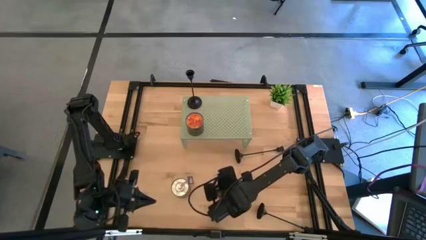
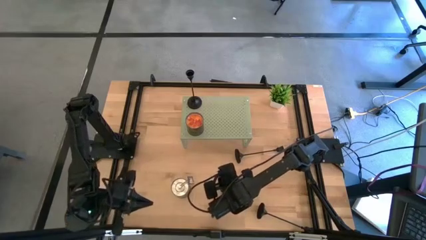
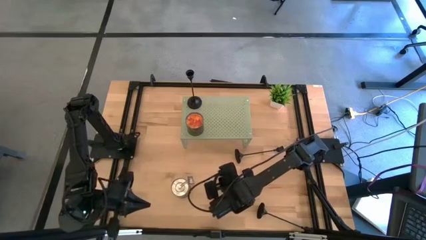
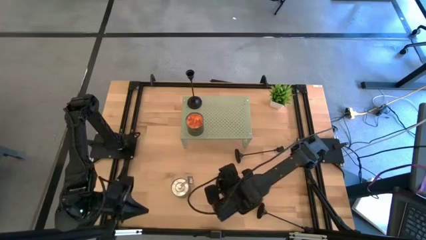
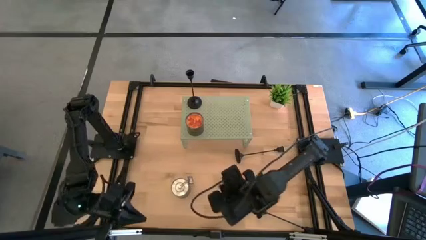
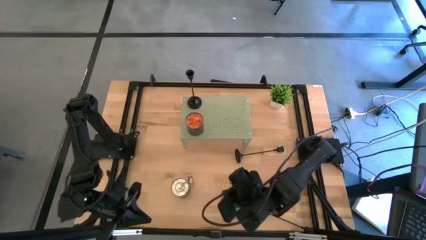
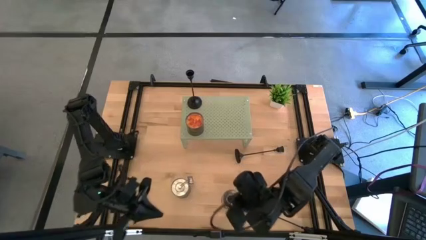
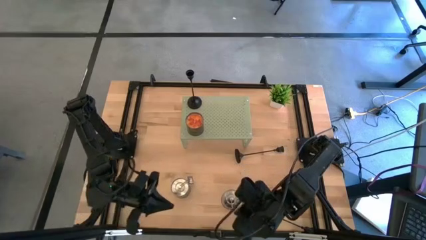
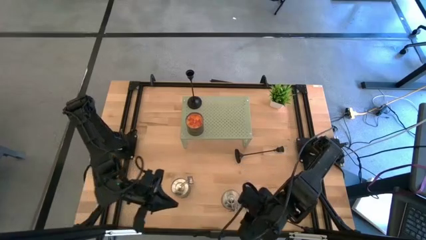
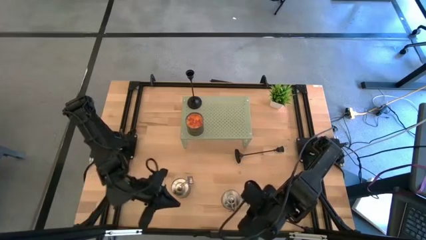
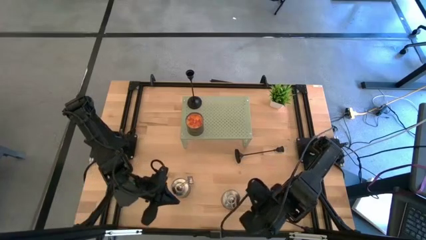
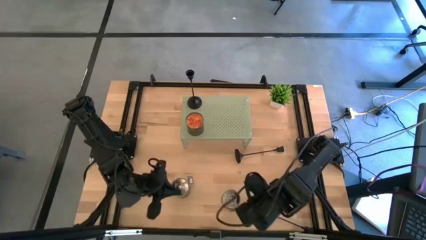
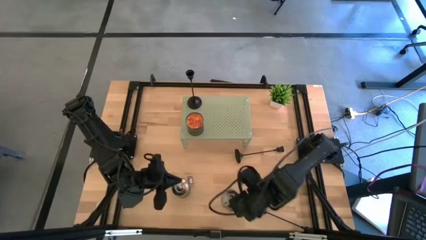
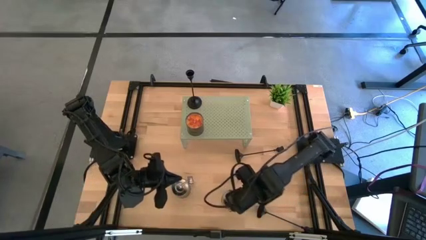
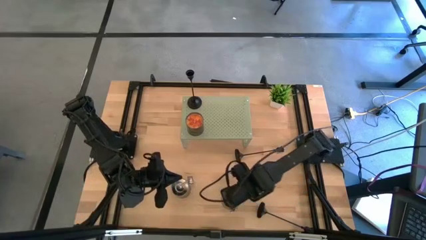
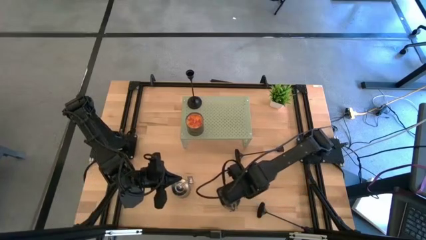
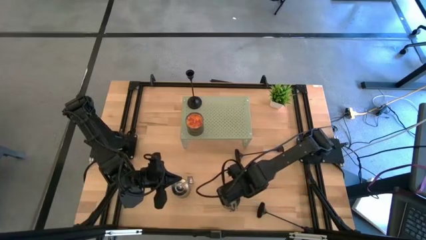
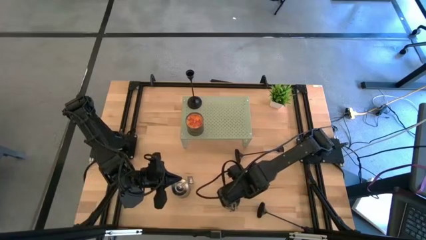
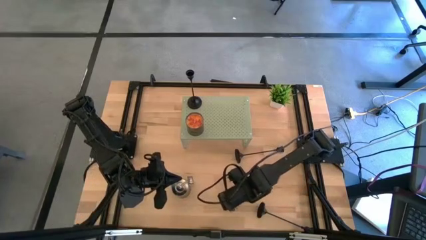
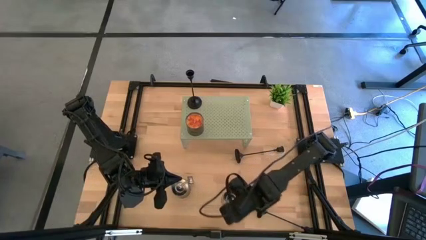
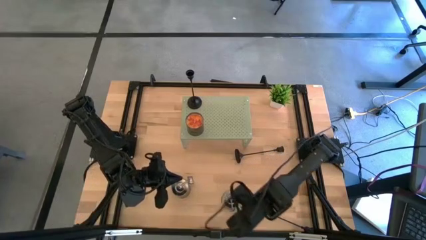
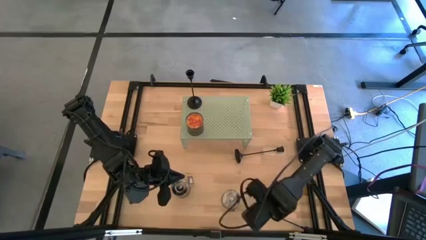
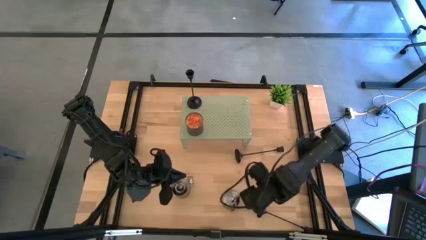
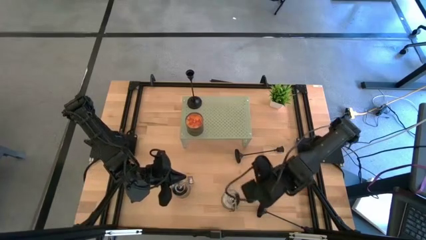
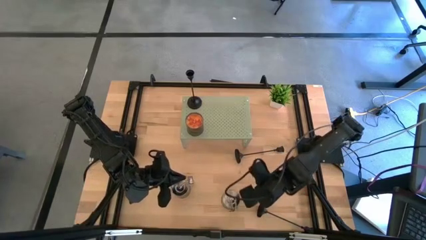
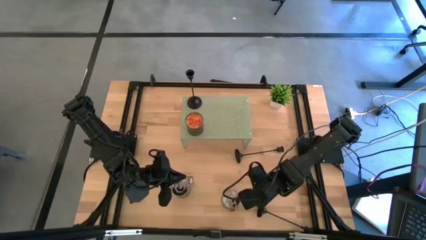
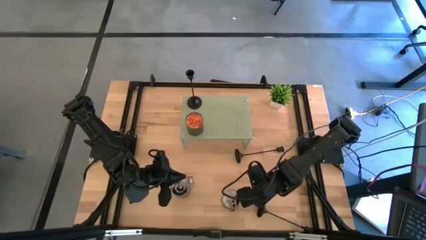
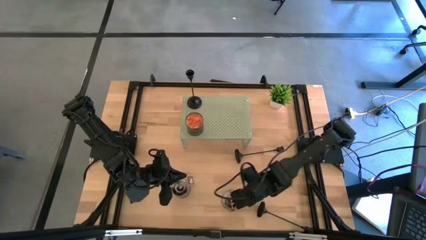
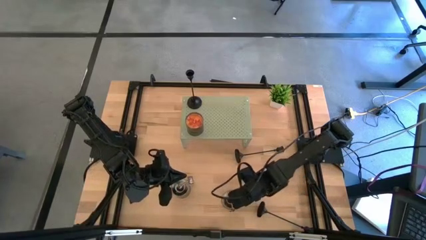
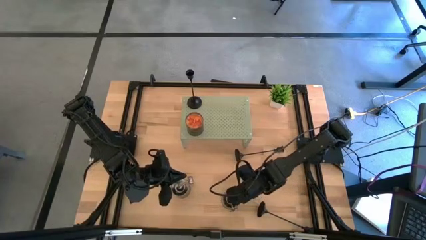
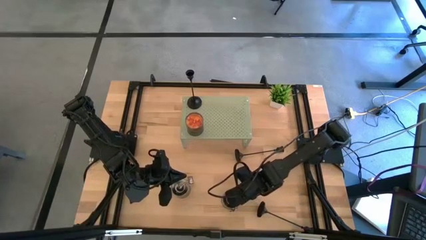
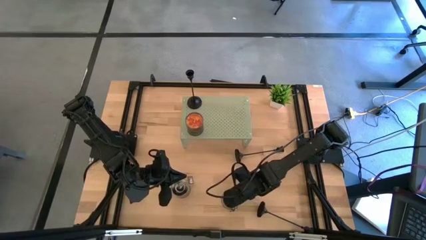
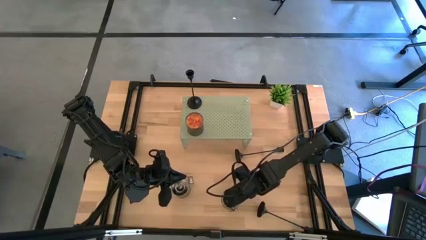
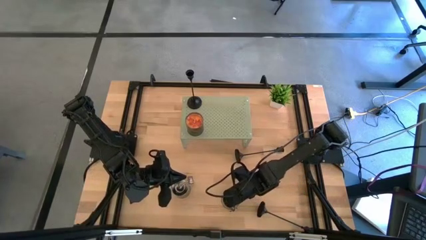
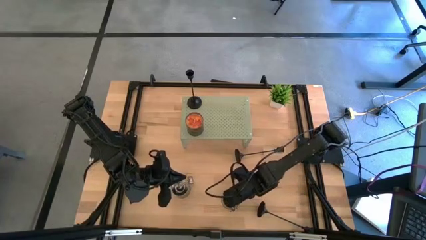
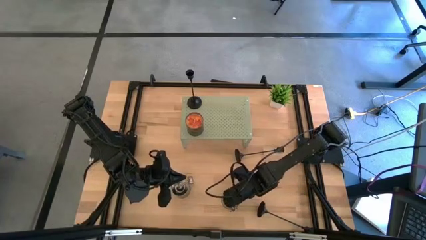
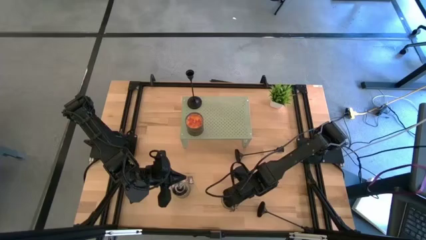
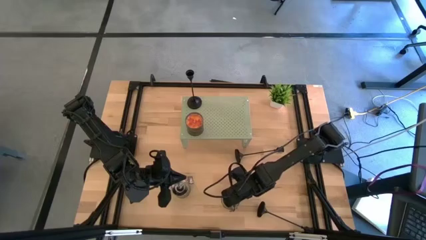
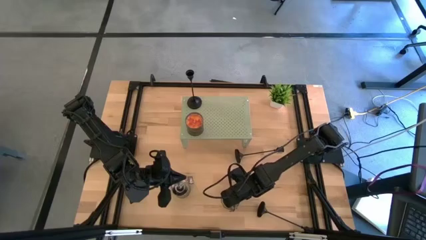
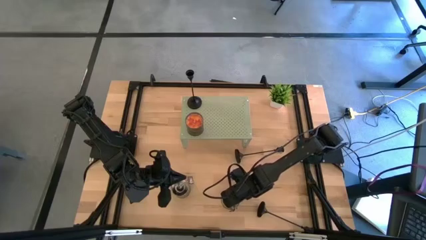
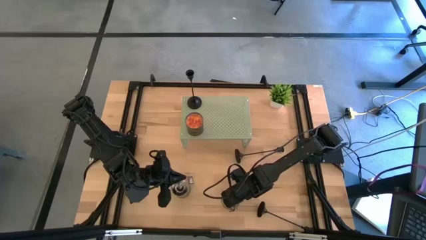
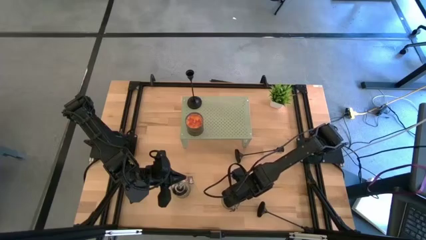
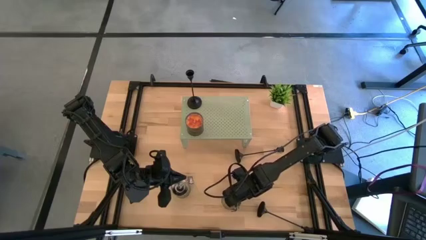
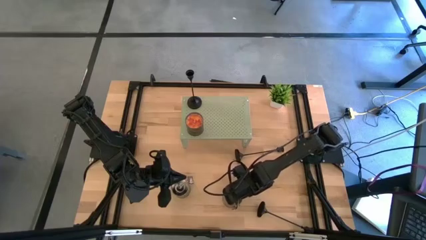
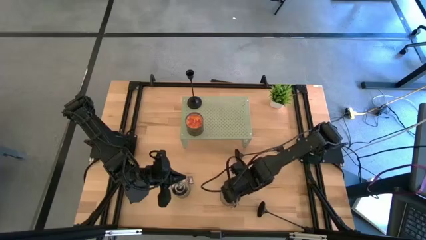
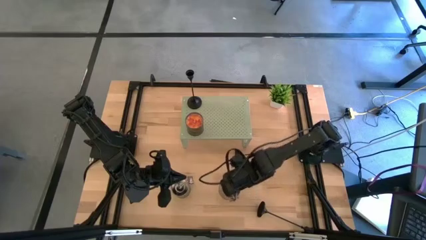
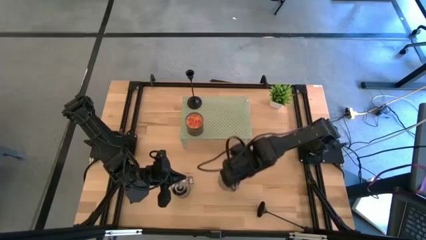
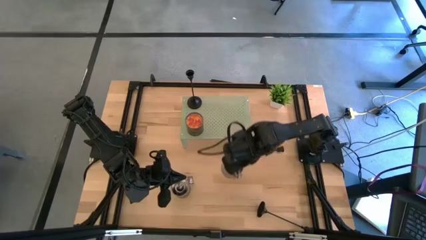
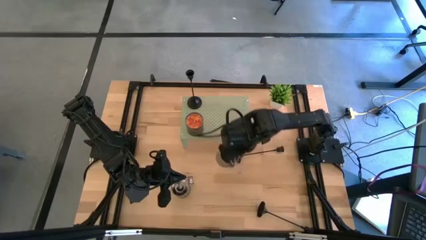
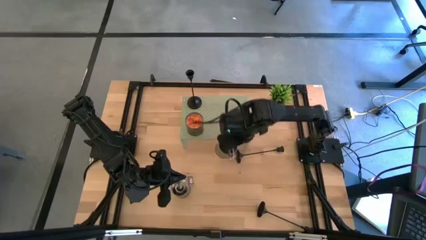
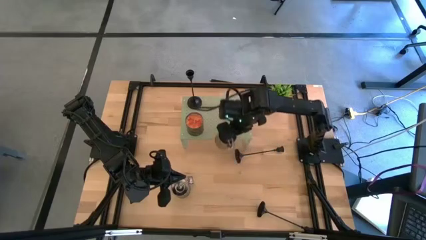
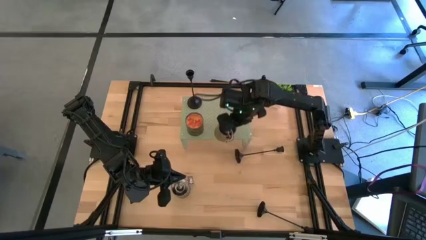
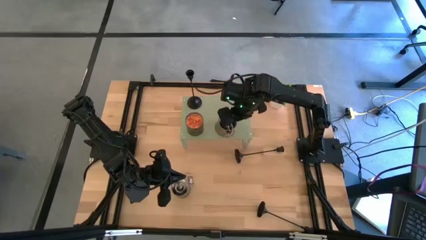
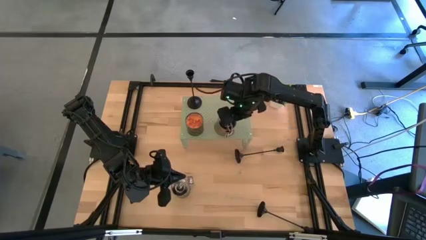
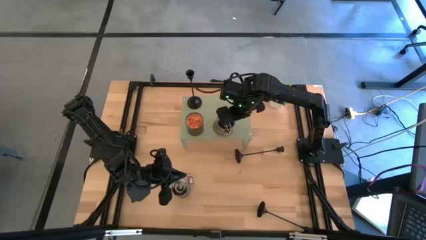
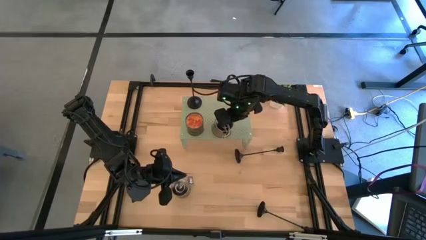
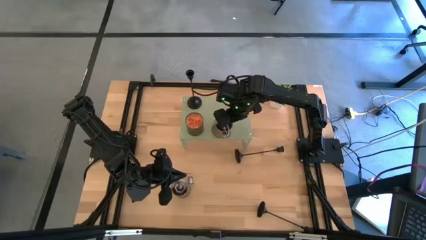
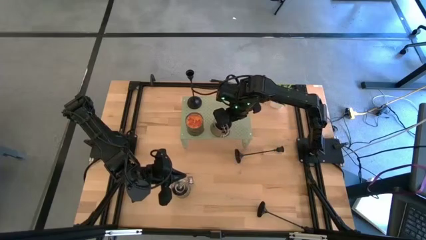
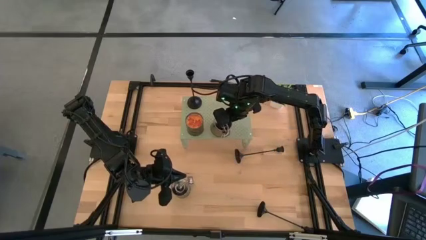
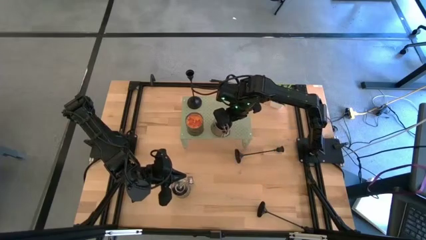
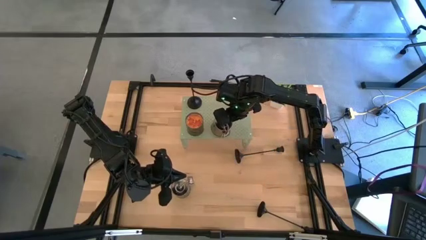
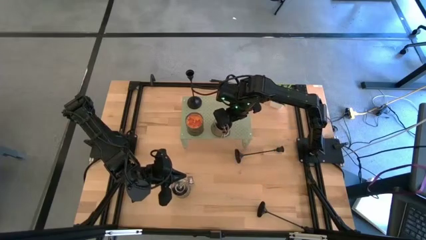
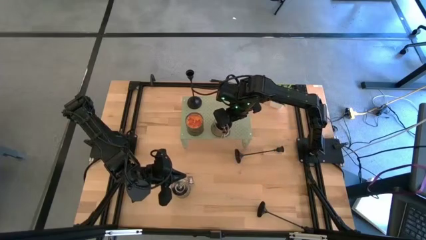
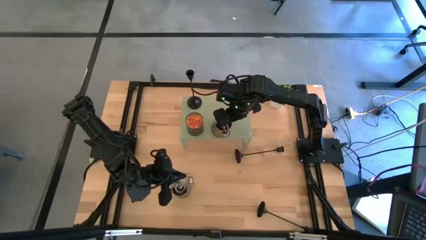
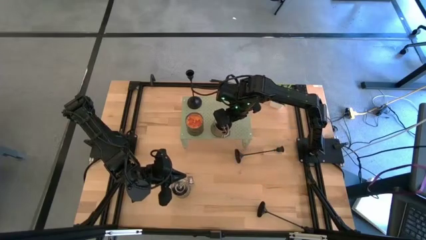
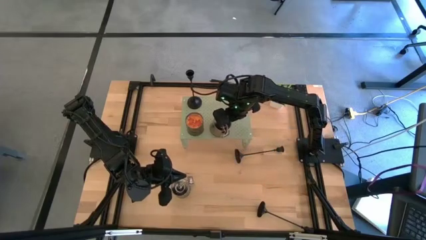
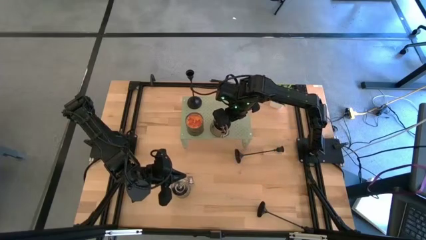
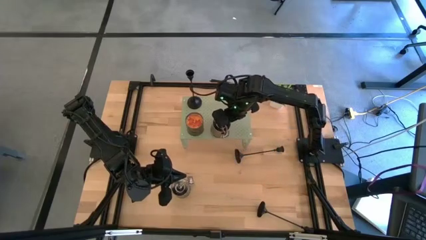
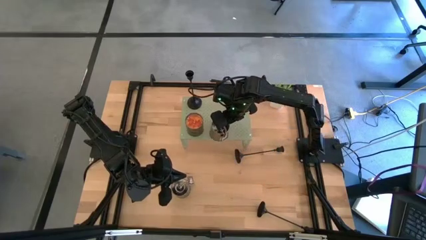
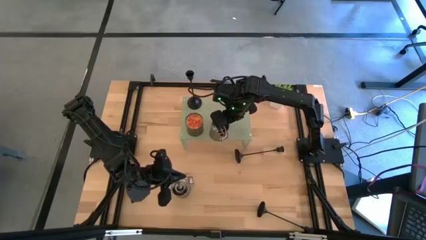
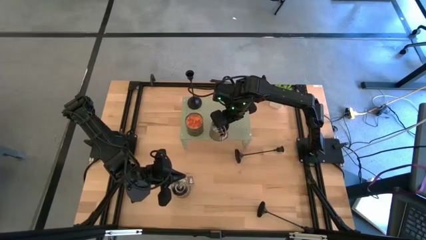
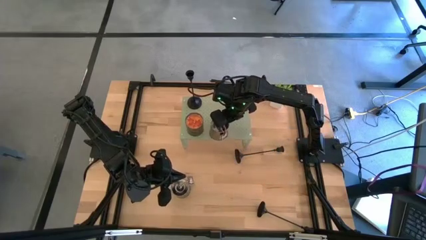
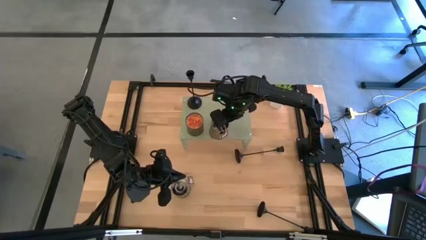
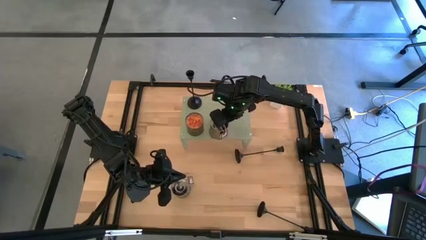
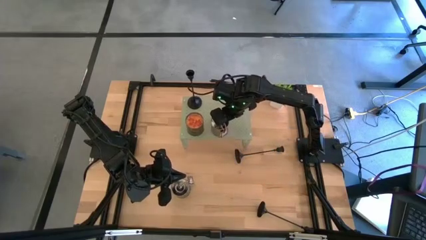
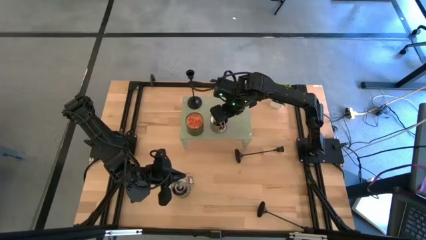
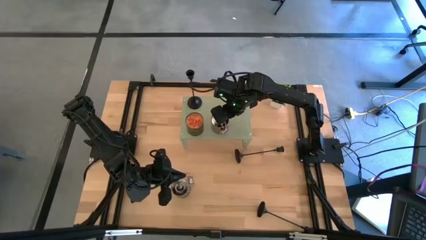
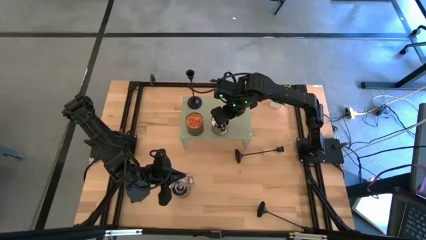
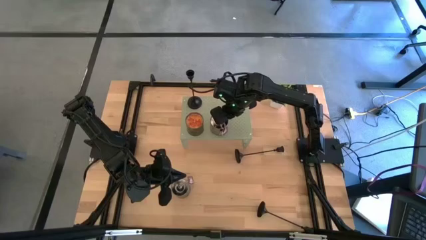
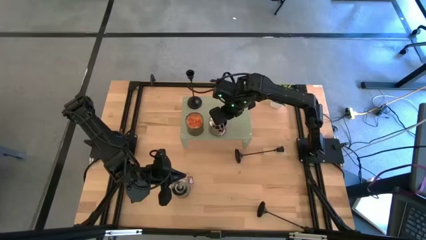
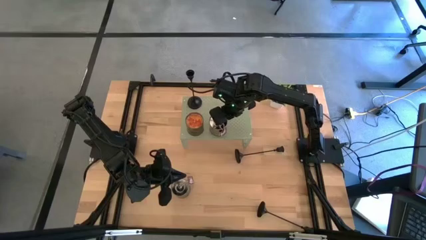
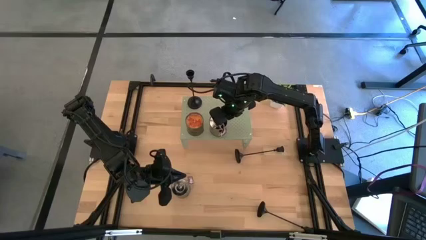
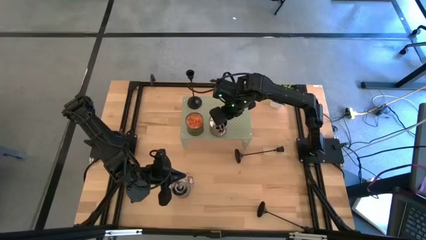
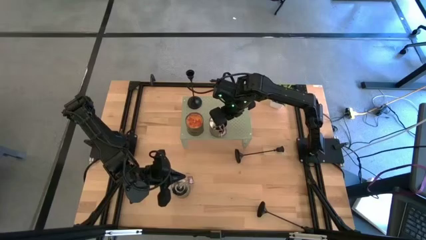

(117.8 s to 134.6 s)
Task: Pick & Place candle stick holders
Put the top brown scented candle on the shelf aligned with the other scented candle

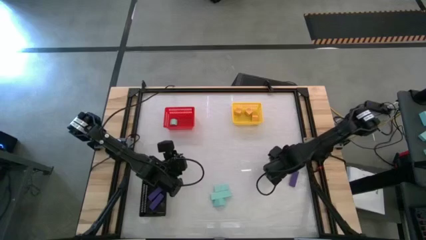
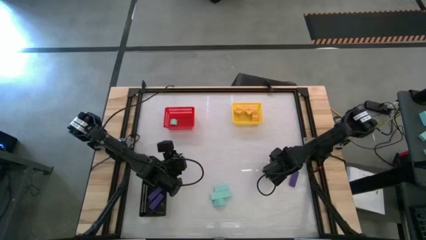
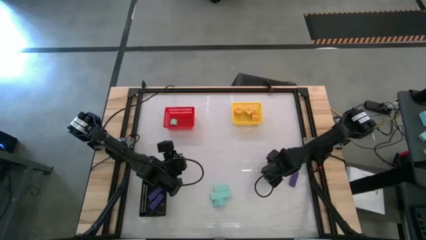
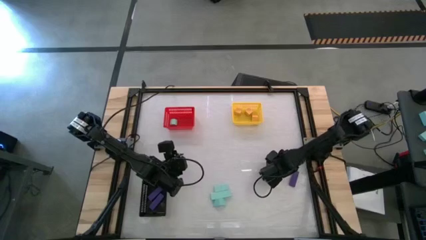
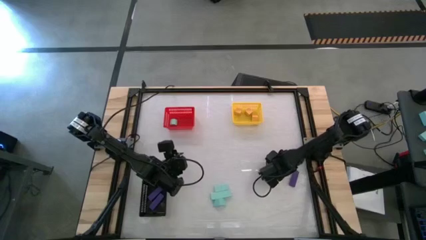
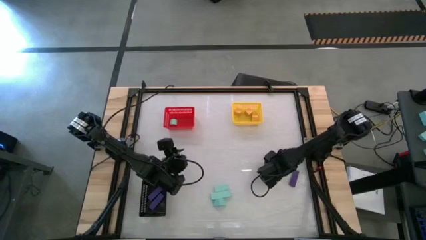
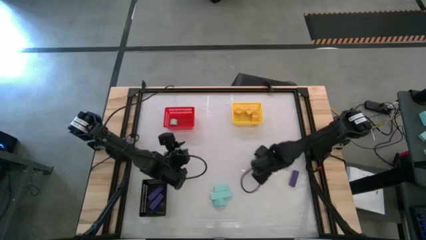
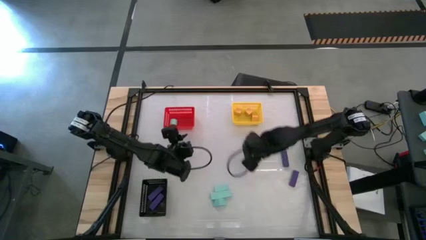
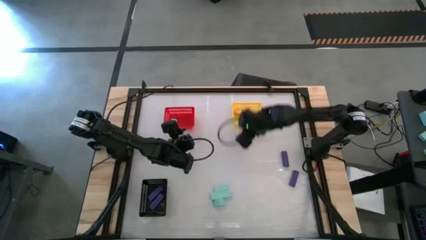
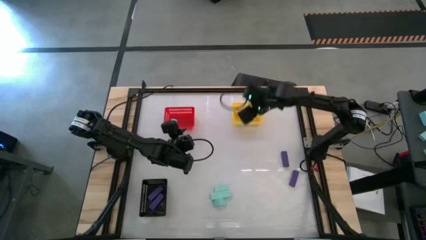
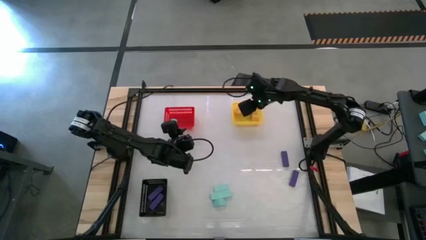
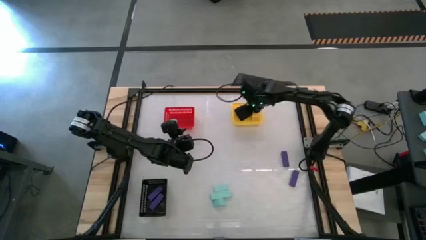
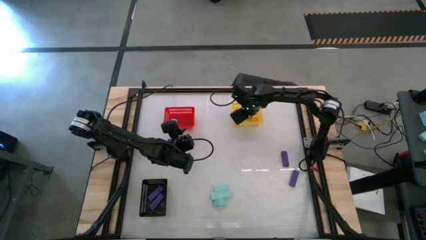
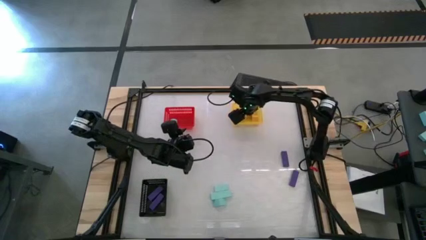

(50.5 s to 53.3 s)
Task: Sort & place blocks by color
Put the yellow block into the yellow bin
